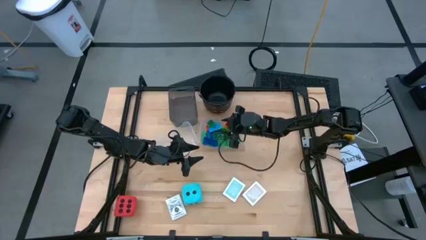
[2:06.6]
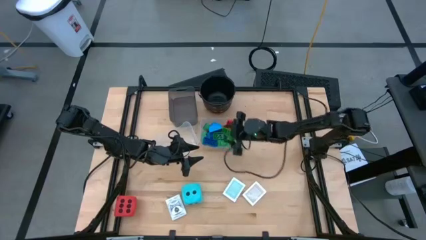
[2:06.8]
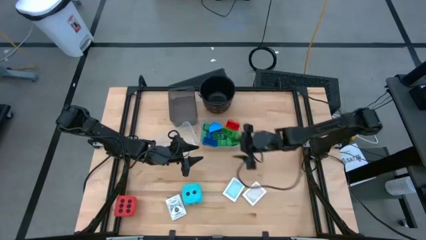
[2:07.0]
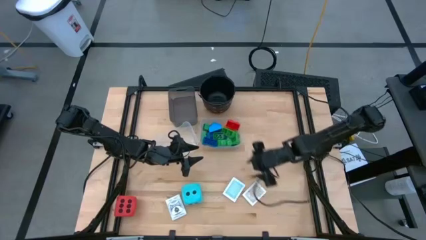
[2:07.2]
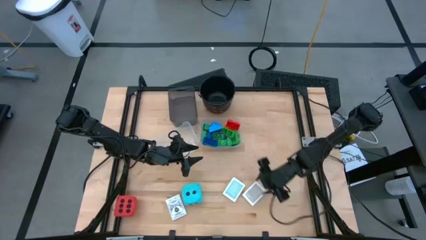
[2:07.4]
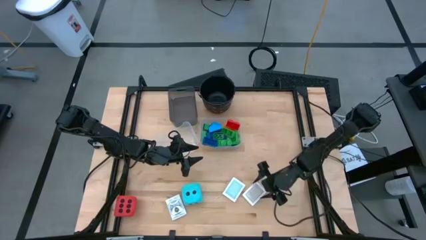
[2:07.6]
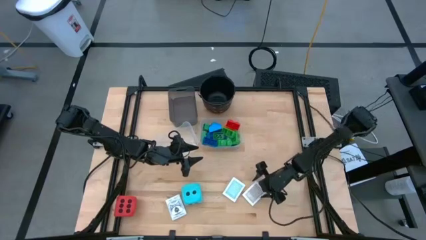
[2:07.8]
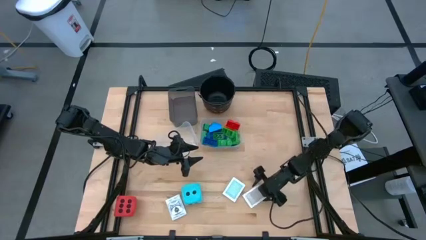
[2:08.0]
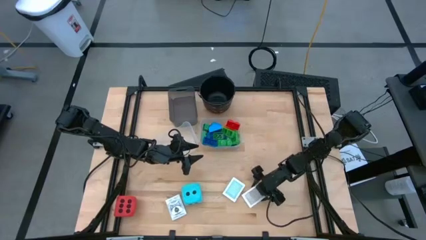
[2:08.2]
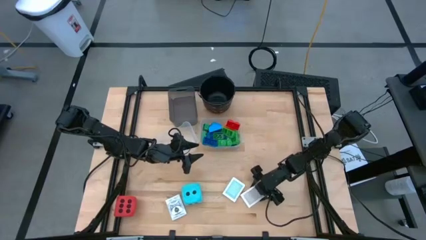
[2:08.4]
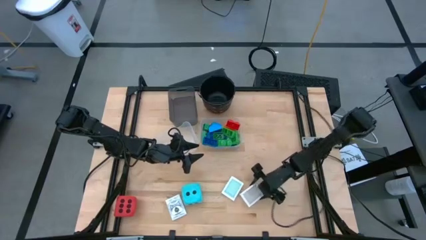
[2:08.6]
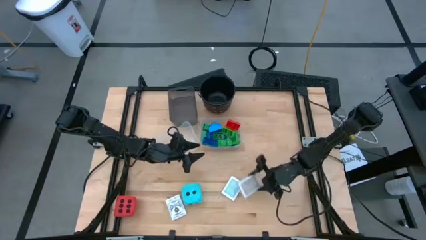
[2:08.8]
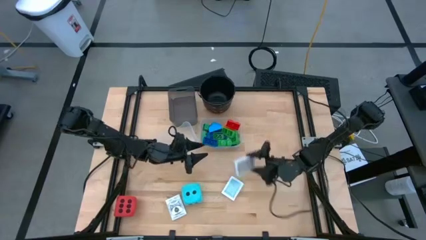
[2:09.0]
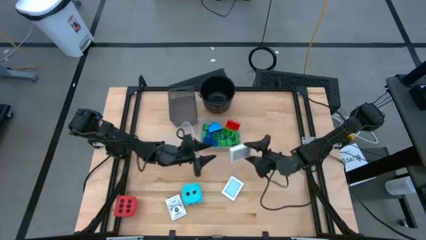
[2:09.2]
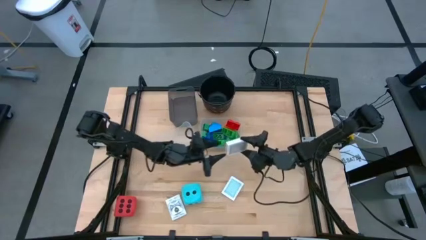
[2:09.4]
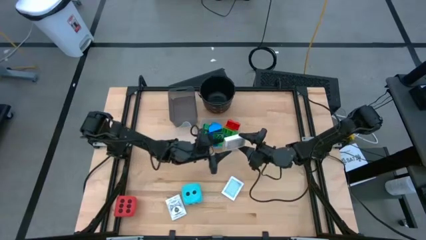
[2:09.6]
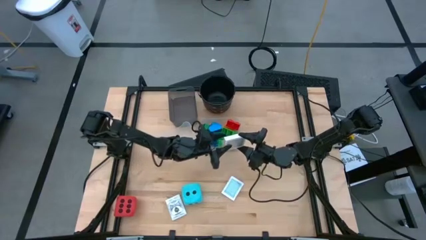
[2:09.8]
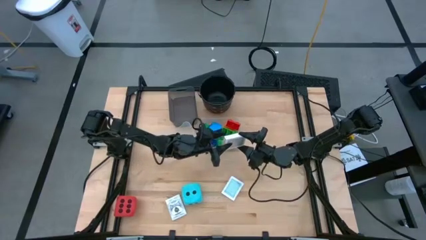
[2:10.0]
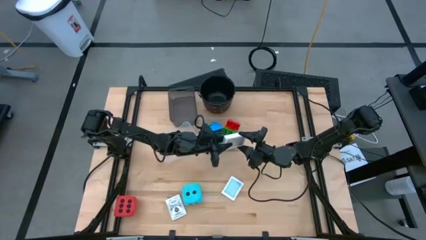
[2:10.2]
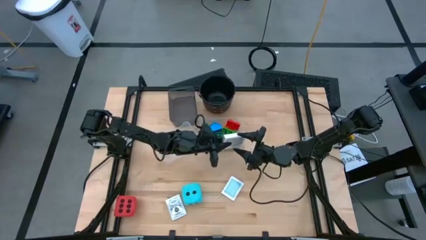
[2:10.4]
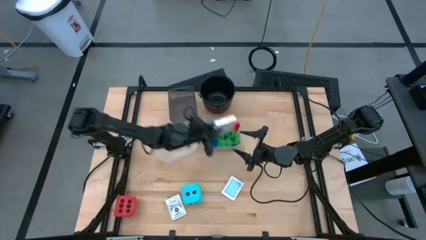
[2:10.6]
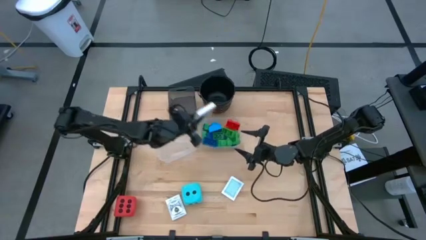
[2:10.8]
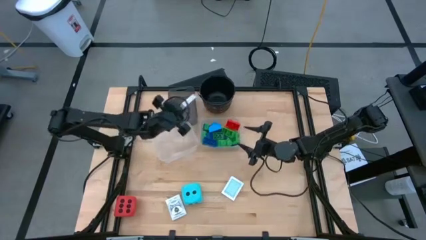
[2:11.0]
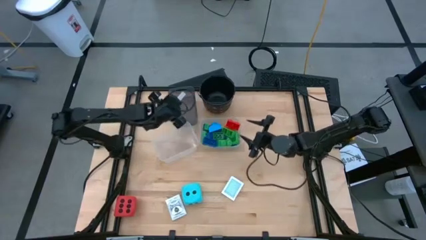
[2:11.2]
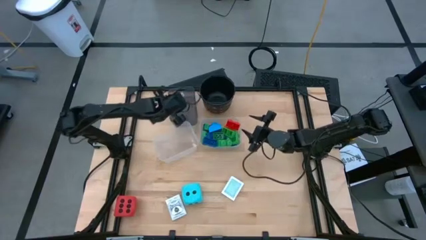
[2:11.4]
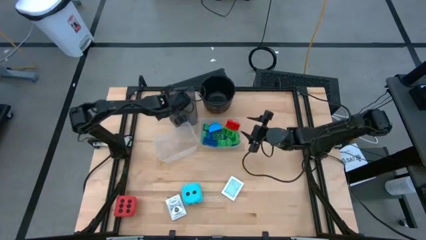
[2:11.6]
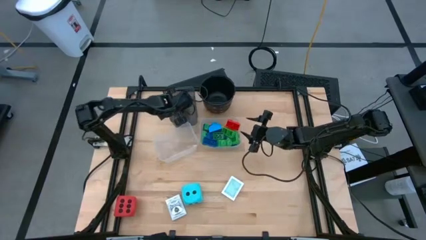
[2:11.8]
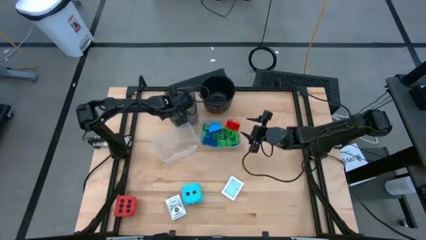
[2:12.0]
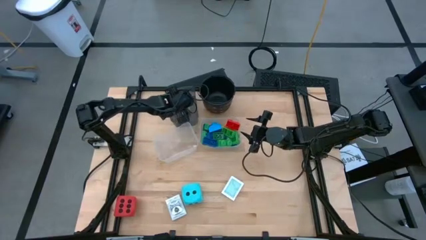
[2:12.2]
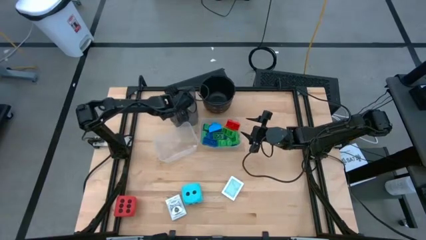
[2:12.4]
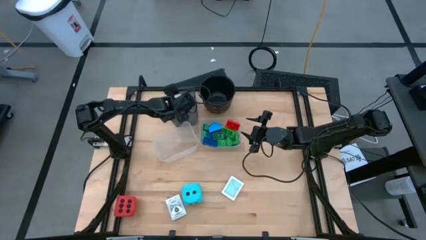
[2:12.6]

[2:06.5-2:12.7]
Task: Pick & Place Toys
Put the gold card box into the black bin

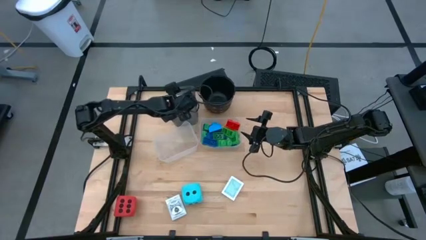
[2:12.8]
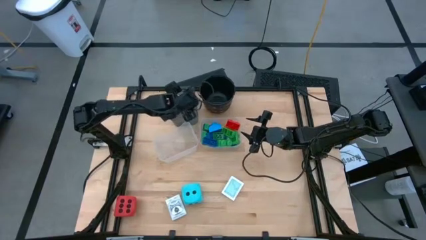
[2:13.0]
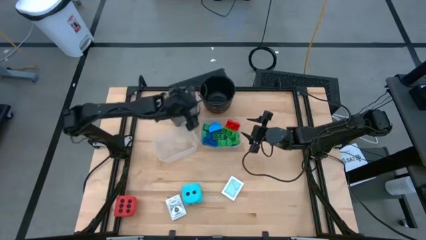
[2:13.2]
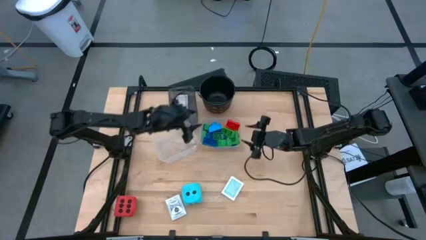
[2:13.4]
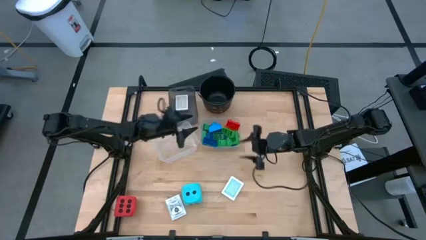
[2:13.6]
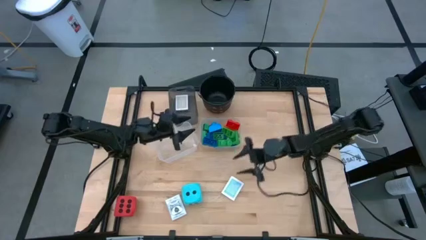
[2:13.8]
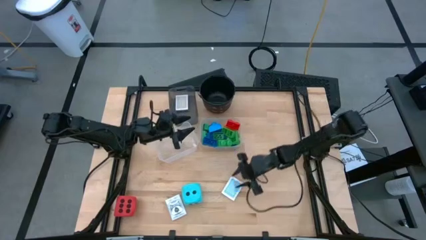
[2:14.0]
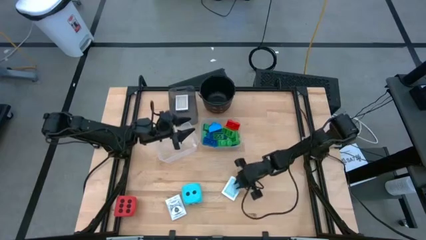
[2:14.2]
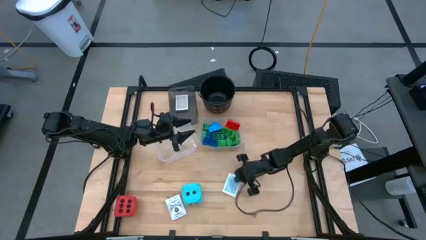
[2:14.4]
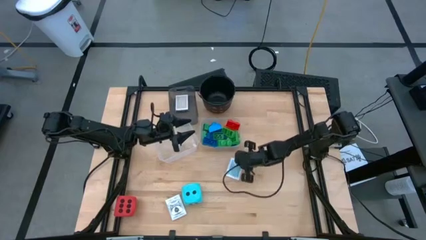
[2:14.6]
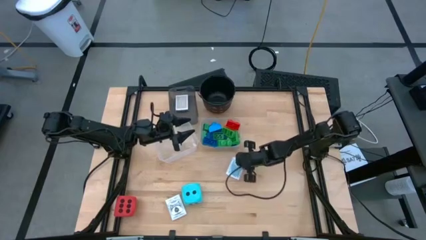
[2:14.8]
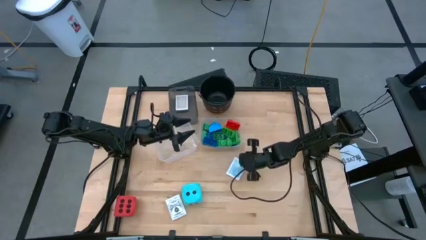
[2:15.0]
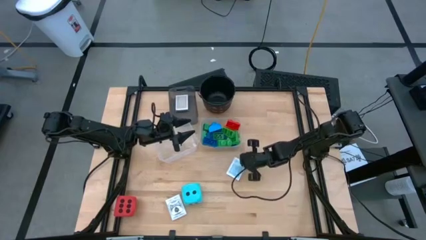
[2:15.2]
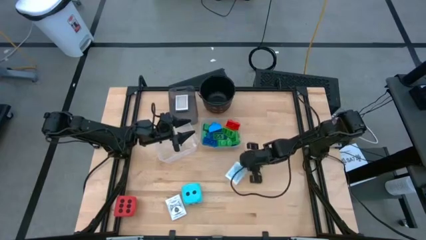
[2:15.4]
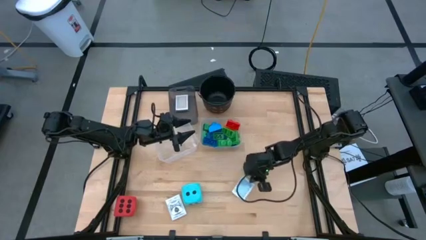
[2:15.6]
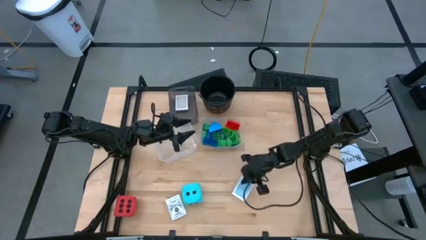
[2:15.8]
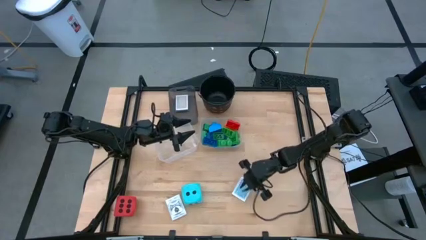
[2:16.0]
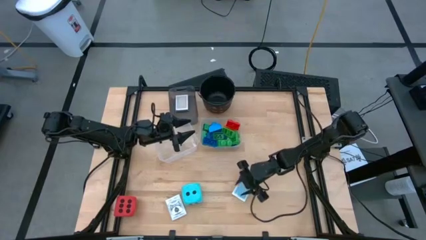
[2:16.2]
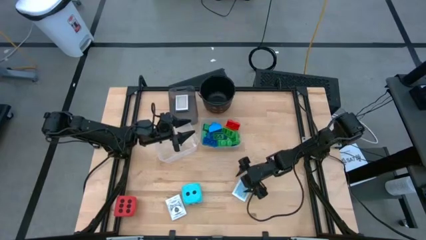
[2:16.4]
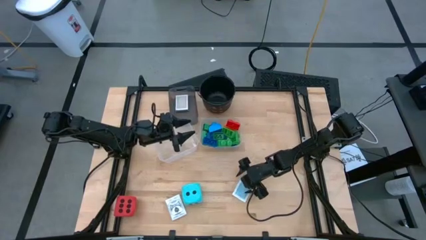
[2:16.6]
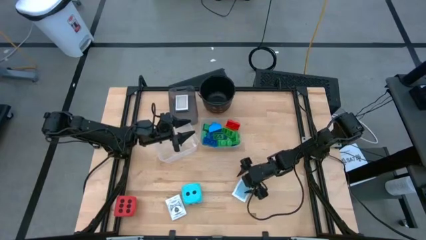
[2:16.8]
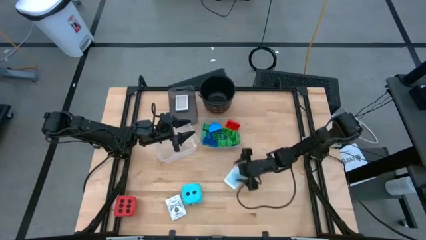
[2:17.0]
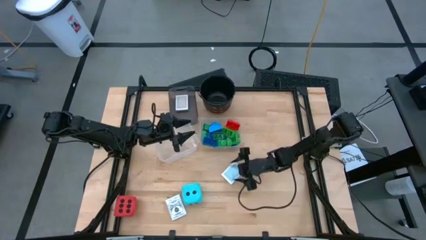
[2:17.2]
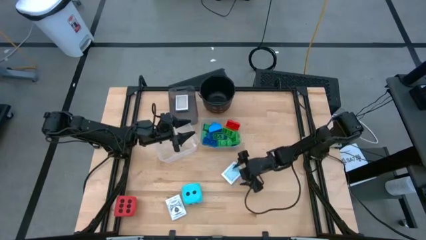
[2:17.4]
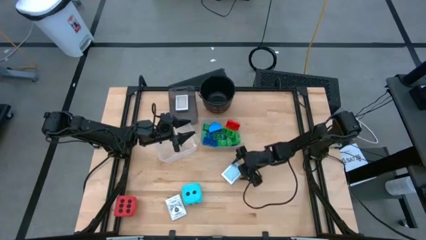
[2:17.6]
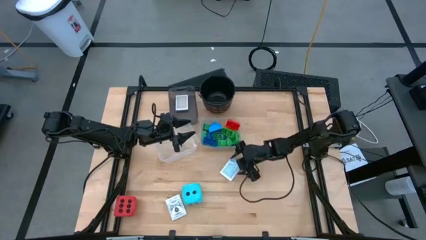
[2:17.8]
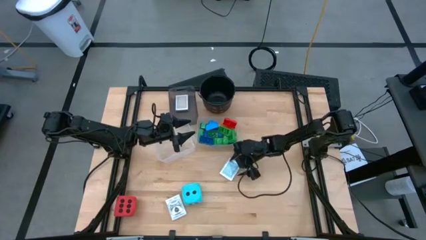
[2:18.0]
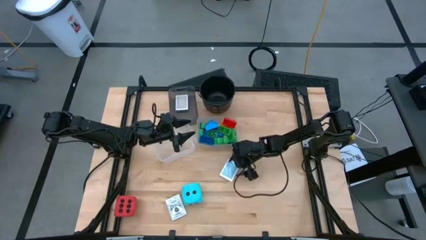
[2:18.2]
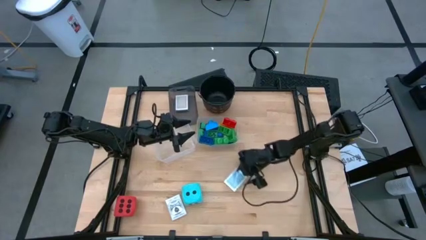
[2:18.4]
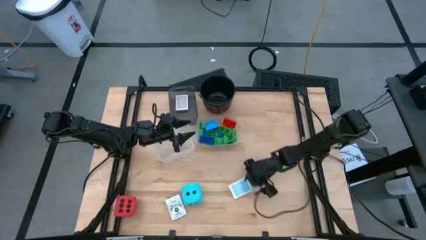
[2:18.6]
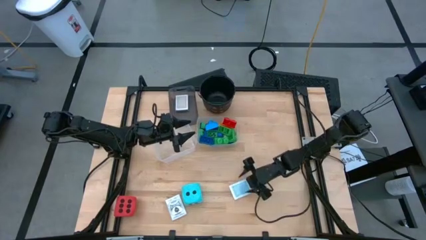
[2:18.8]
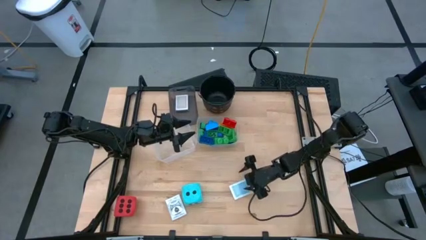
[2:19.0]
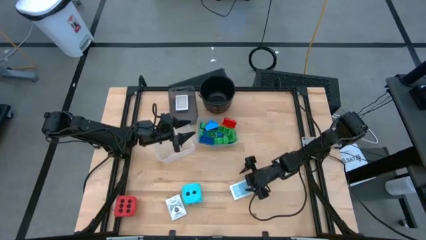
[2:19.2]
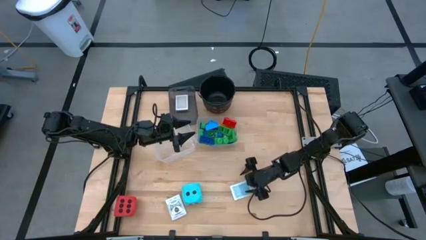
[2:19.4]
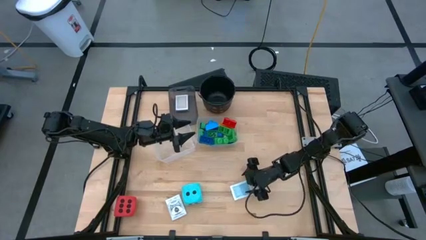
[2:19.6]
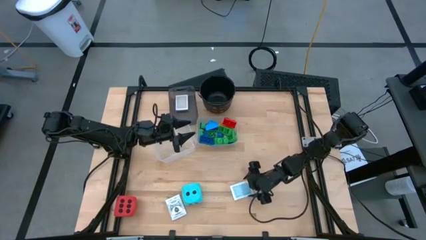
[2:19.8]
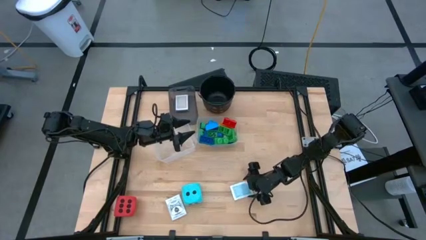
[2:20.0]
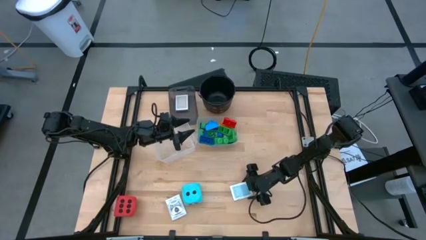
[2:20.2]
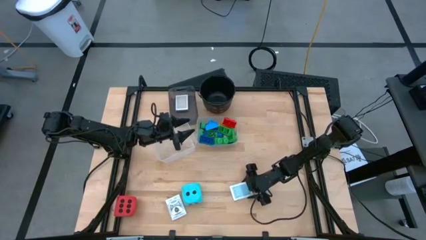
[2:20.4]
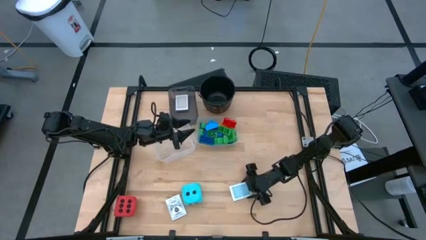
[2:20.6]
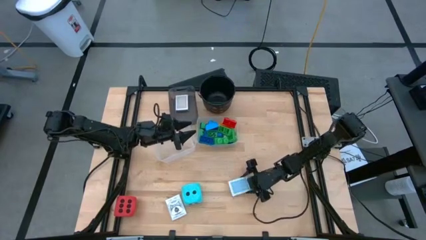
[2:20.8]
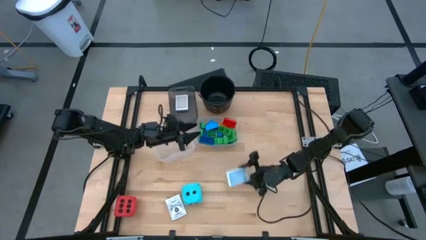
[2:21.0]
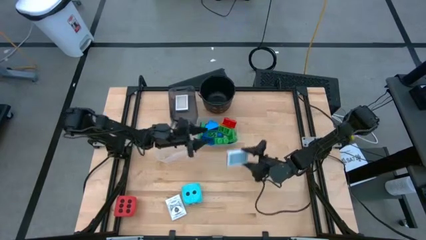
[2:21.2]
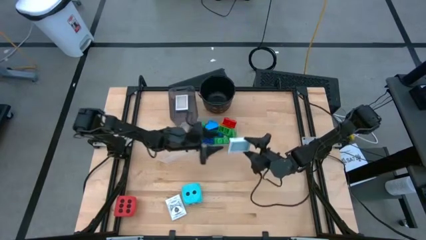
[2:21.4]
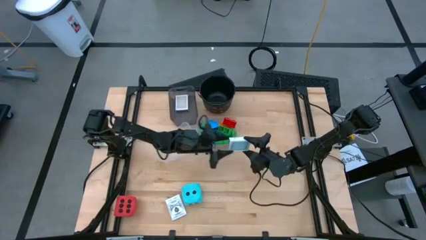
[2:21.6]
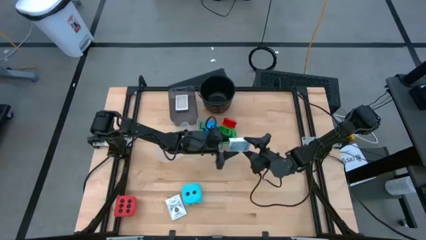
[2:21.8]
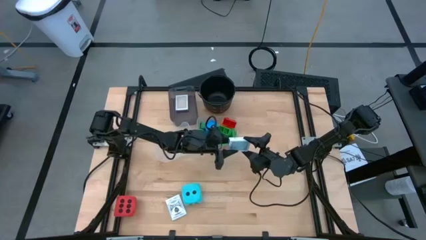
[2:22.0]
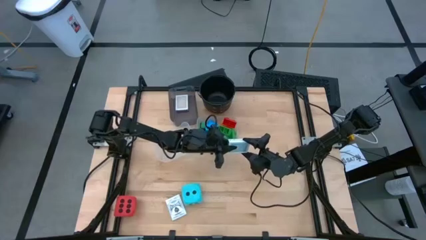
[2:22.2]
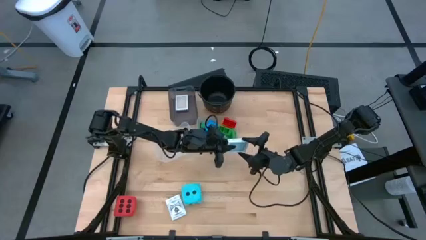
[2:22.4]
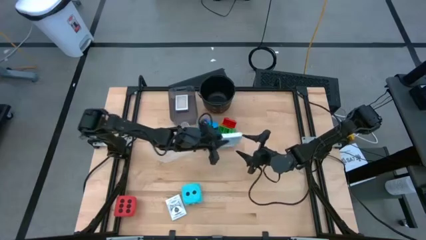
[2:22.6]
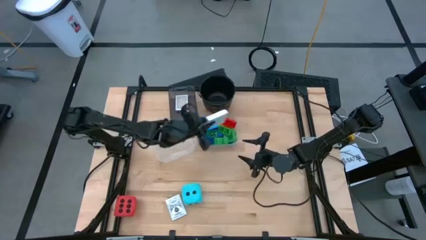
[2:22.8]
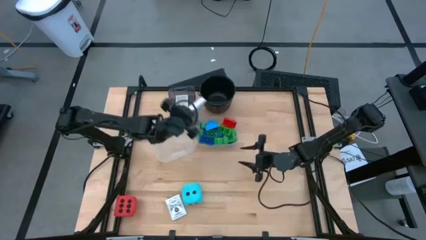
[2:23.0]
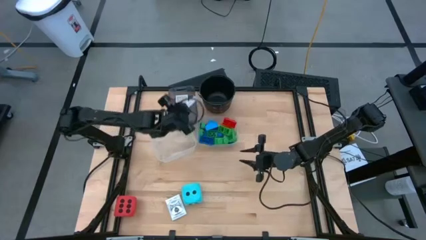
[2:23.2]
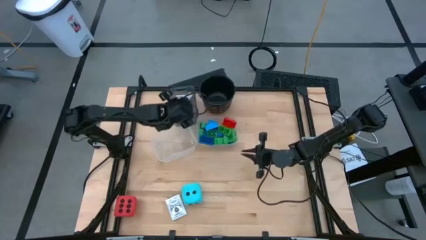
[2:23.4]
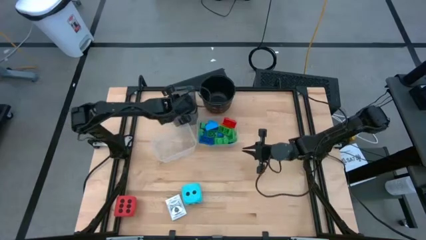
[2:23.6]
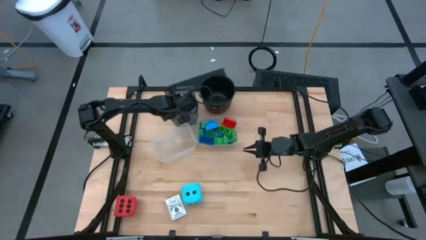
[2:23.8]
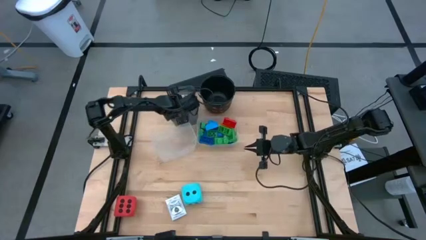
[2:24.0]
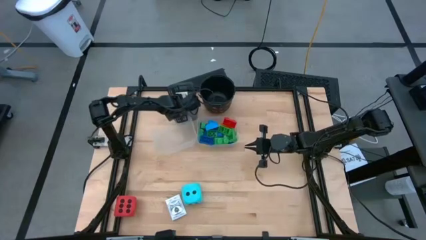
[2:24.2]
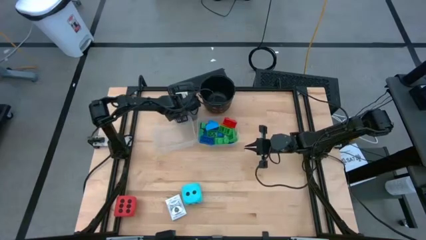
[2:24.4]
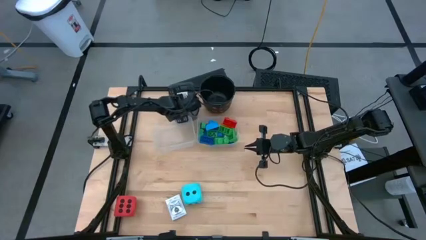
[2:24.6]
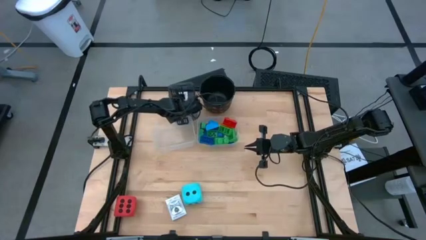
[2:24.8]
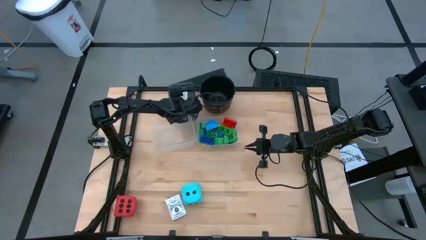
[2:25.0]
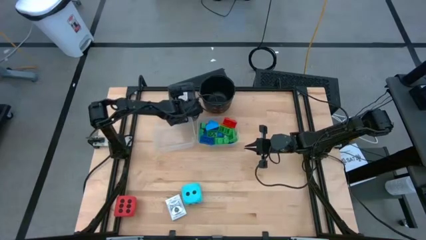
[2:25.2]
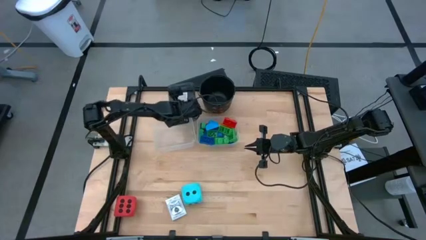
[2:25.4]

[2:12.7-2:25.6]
Put the blue card box into the black bin
